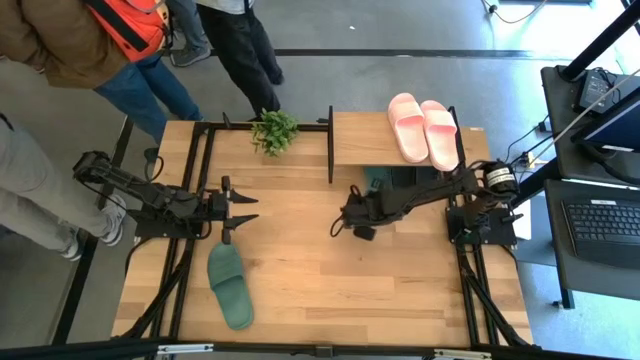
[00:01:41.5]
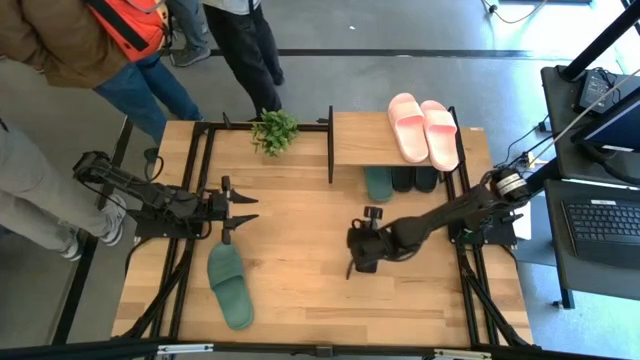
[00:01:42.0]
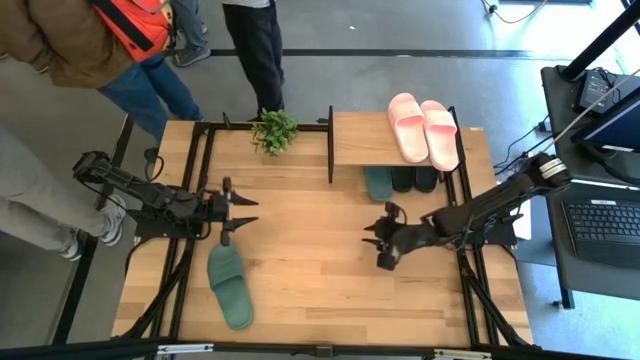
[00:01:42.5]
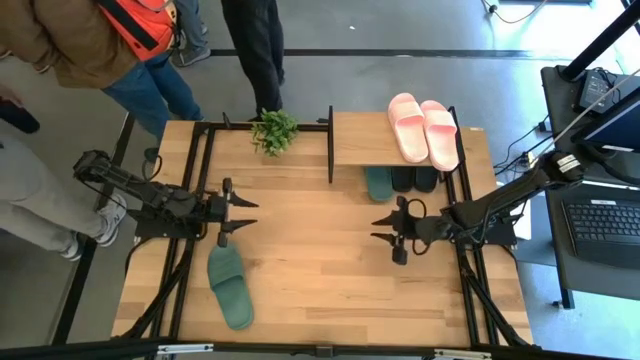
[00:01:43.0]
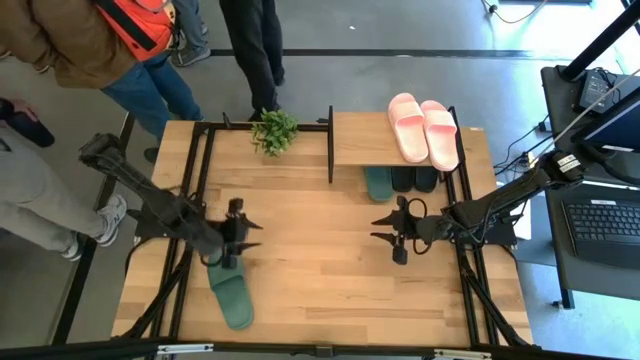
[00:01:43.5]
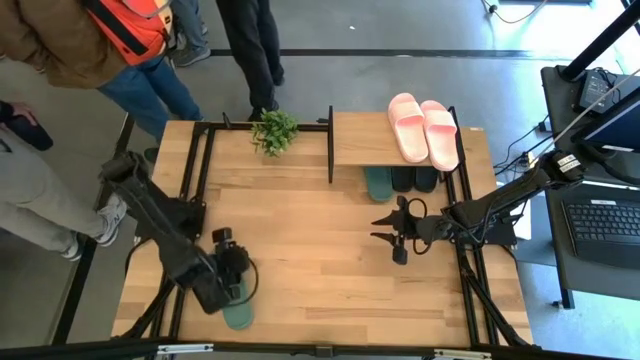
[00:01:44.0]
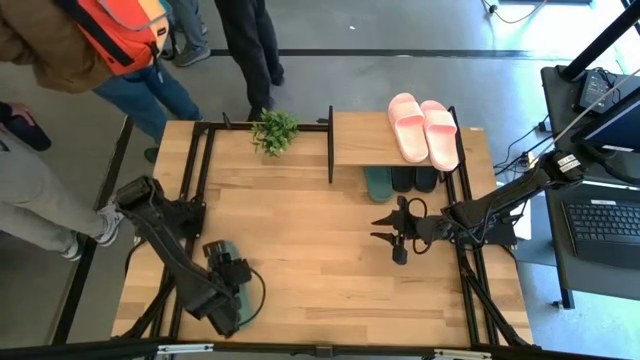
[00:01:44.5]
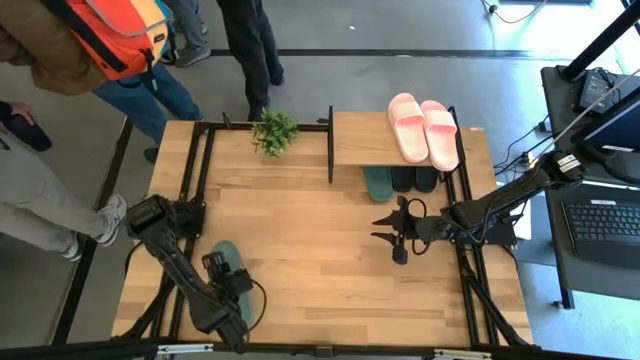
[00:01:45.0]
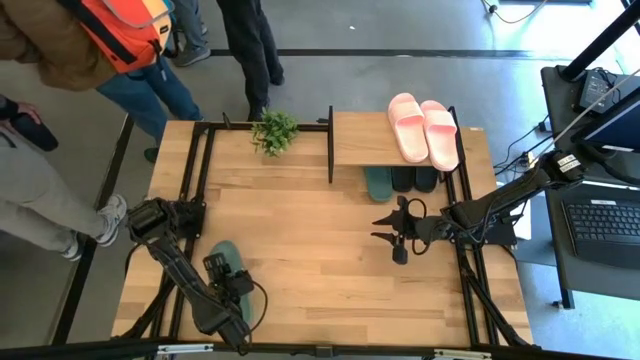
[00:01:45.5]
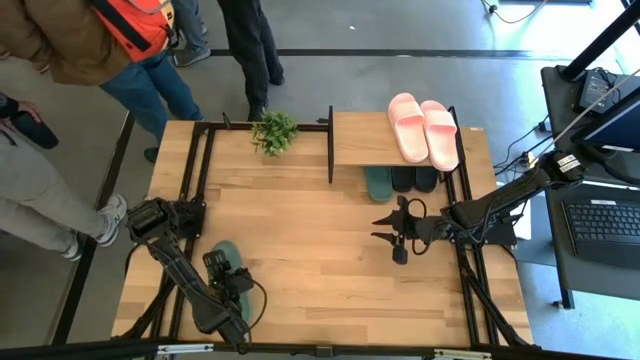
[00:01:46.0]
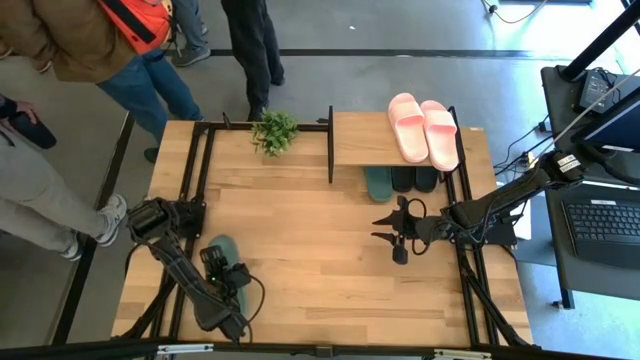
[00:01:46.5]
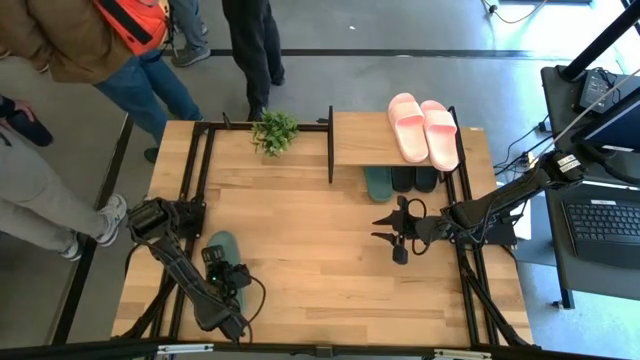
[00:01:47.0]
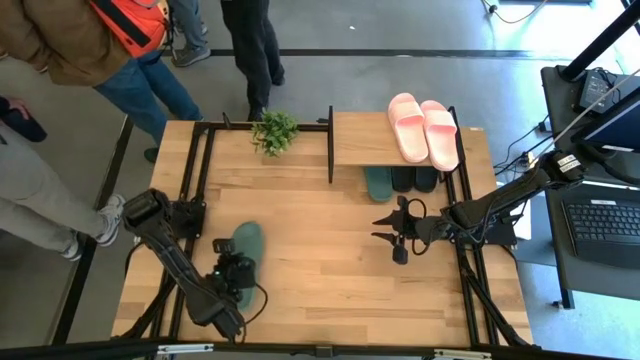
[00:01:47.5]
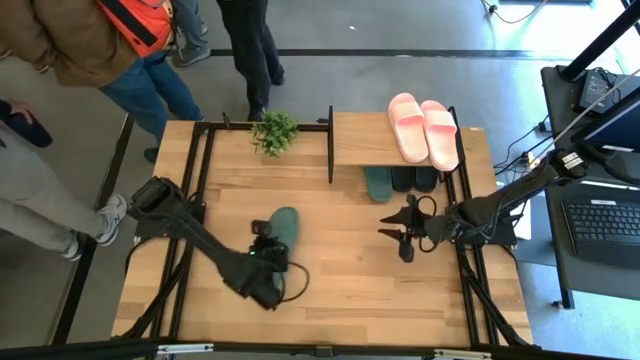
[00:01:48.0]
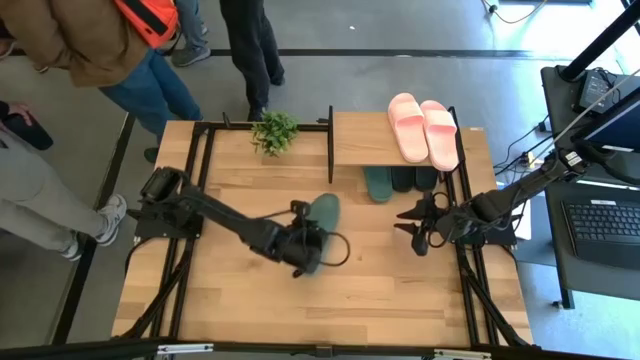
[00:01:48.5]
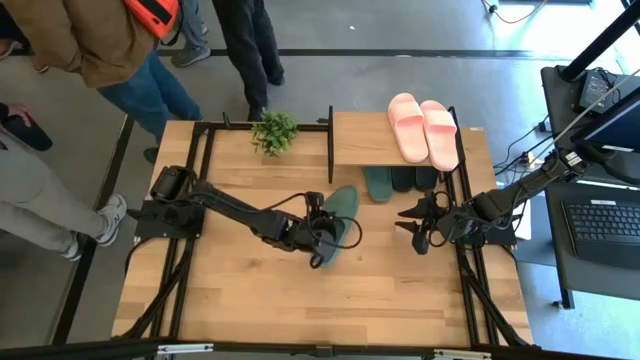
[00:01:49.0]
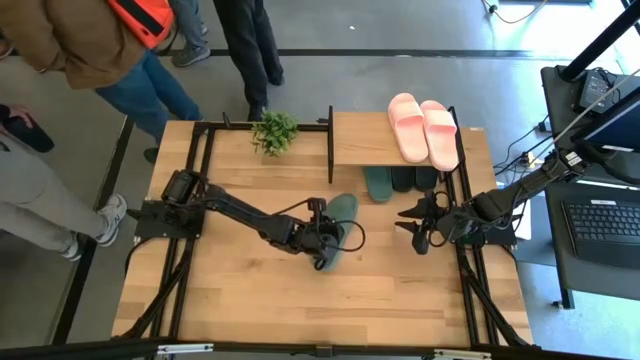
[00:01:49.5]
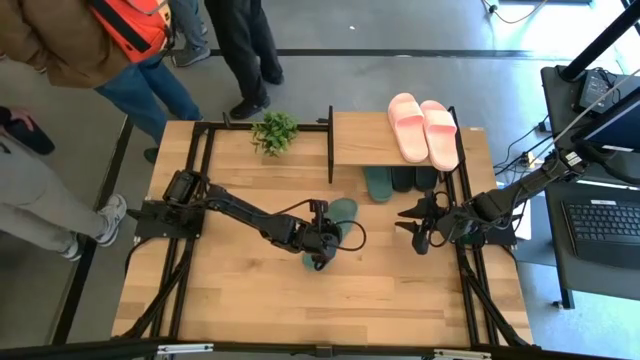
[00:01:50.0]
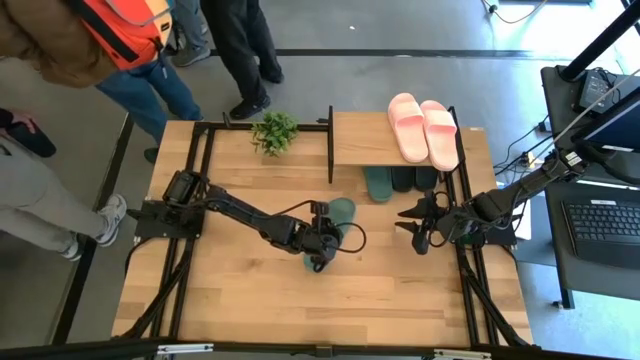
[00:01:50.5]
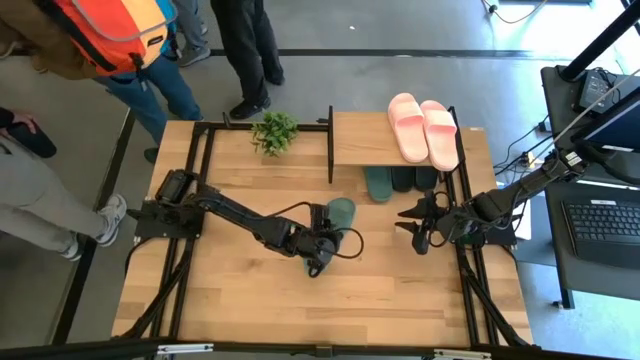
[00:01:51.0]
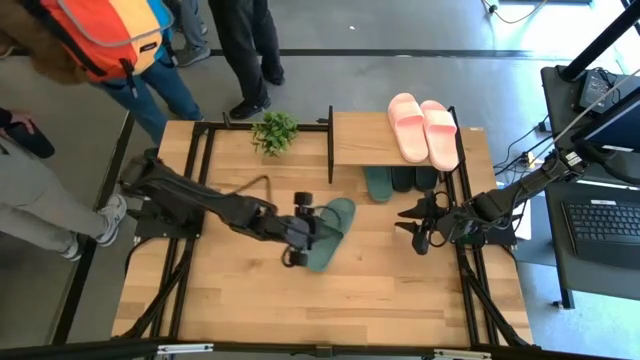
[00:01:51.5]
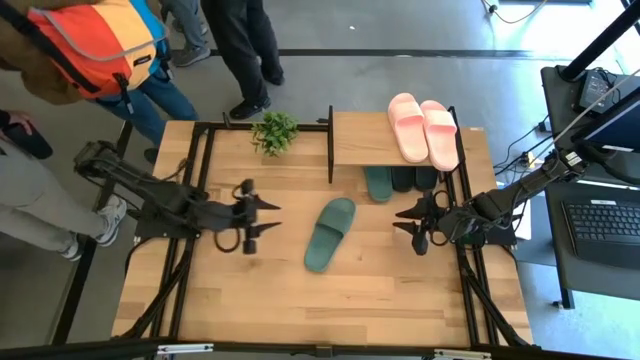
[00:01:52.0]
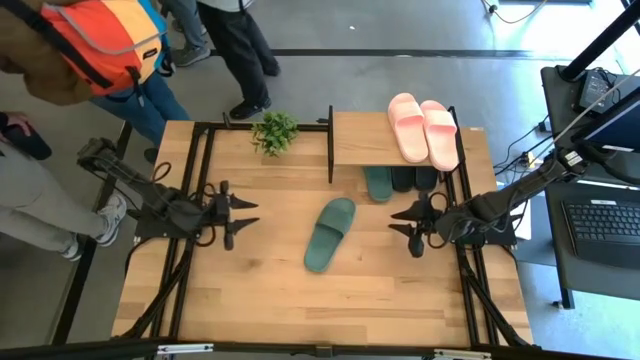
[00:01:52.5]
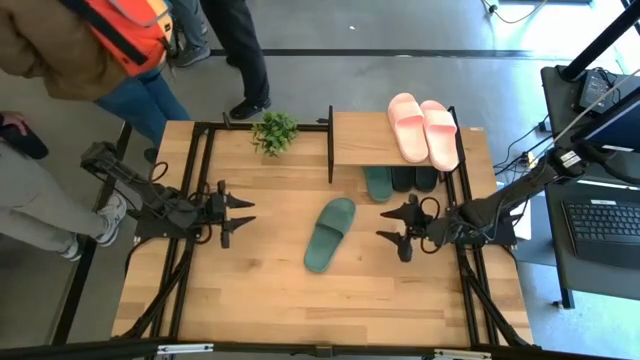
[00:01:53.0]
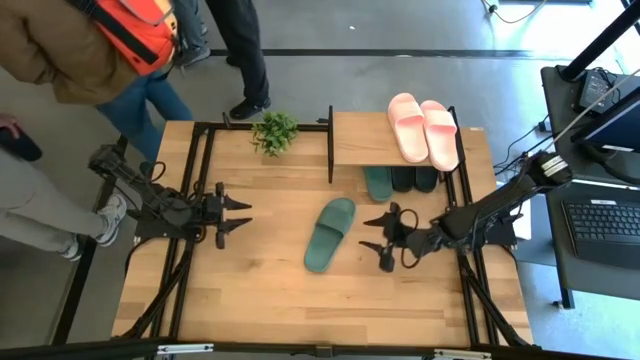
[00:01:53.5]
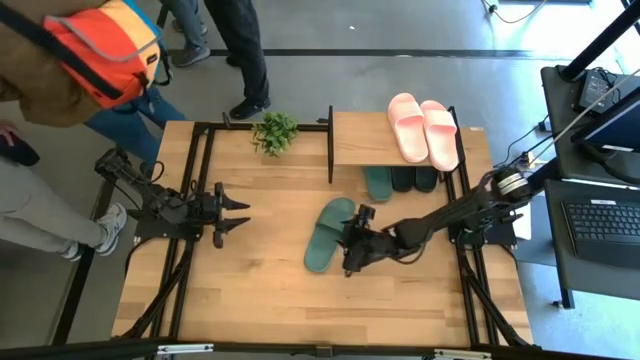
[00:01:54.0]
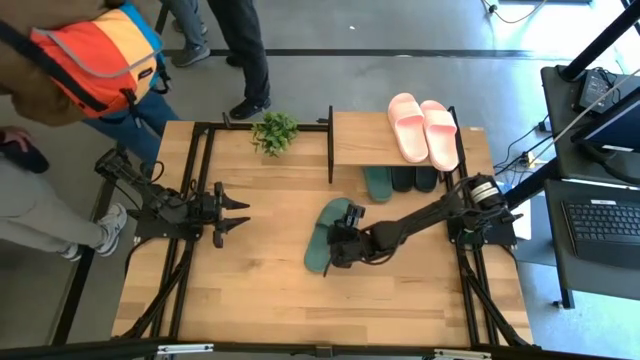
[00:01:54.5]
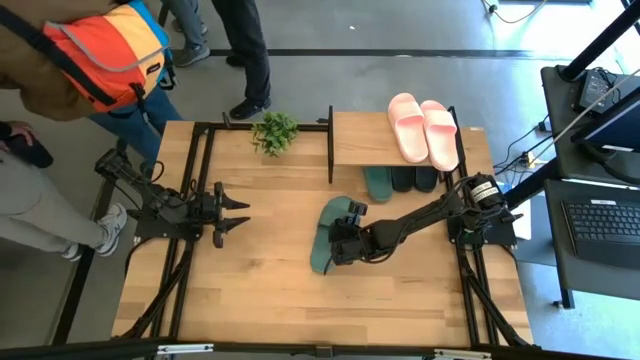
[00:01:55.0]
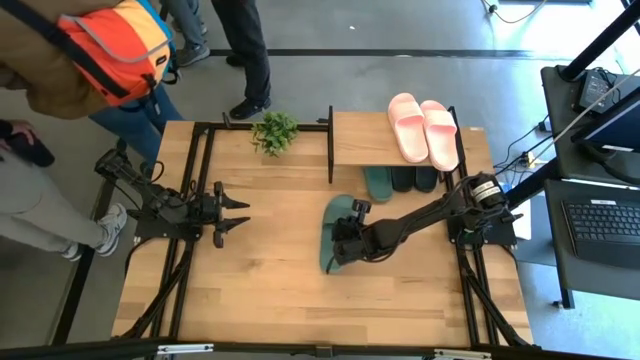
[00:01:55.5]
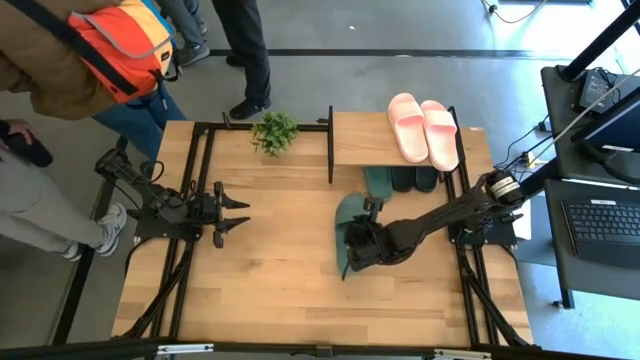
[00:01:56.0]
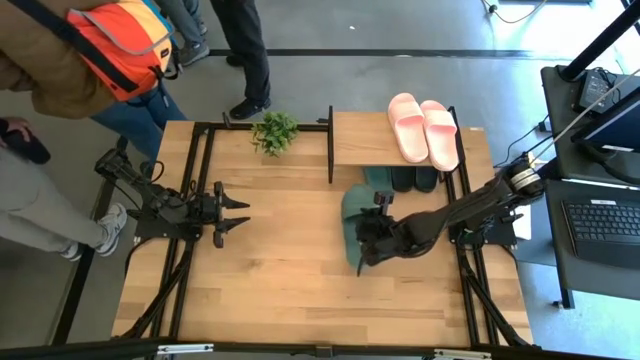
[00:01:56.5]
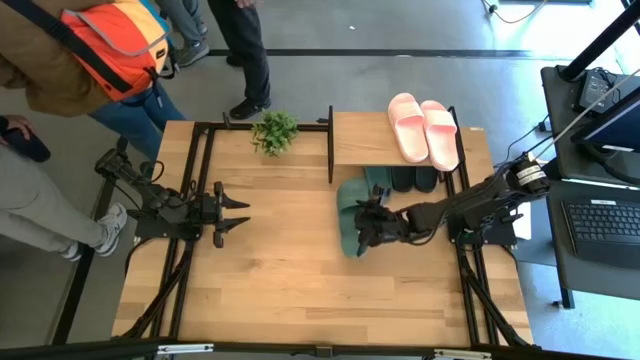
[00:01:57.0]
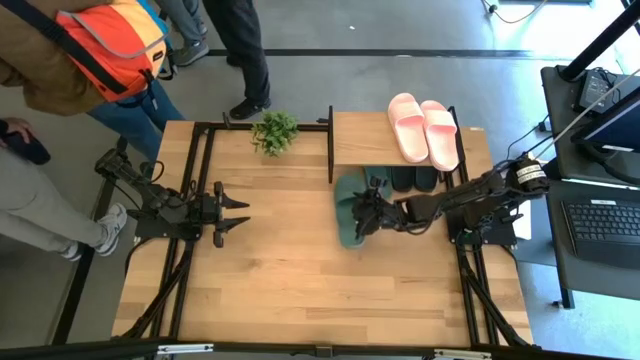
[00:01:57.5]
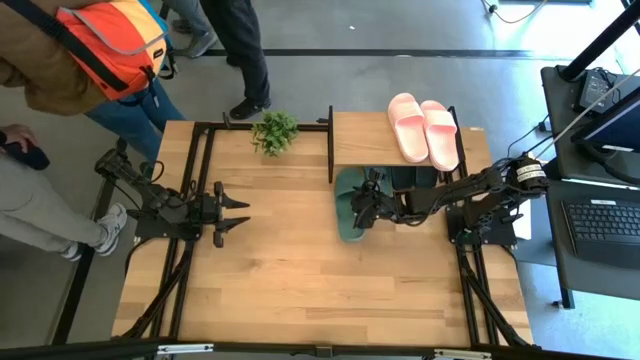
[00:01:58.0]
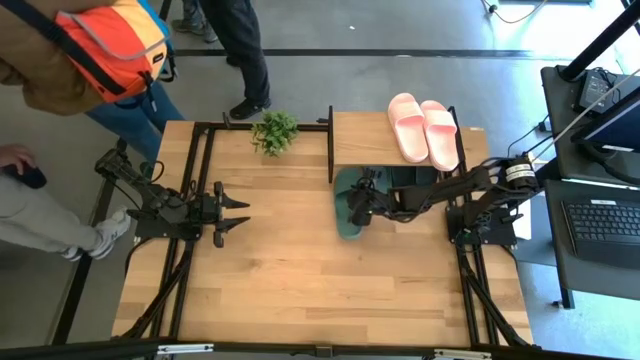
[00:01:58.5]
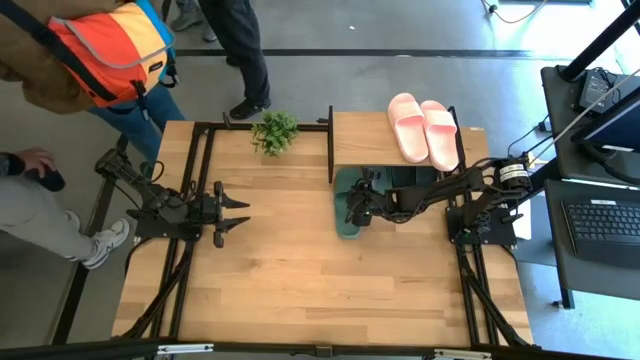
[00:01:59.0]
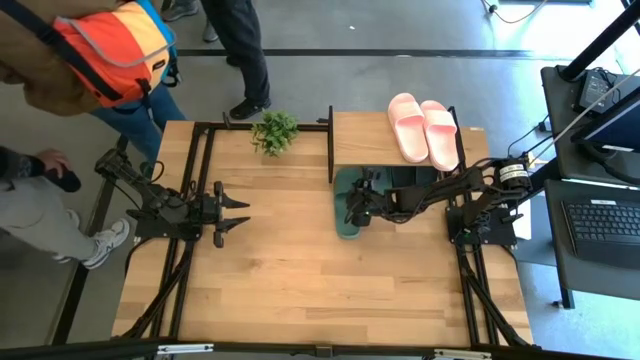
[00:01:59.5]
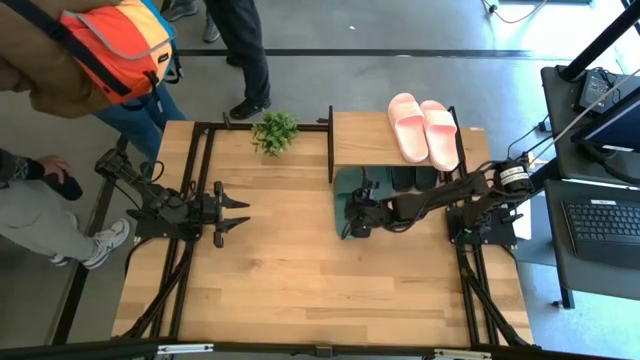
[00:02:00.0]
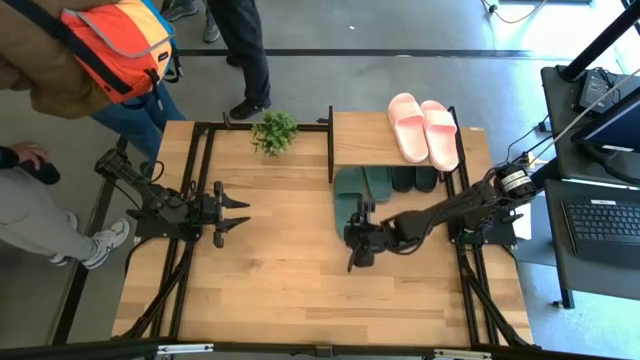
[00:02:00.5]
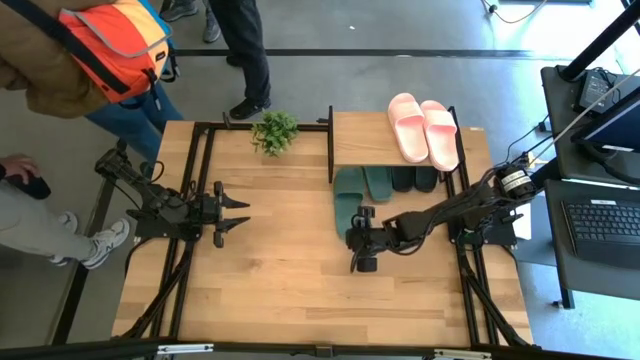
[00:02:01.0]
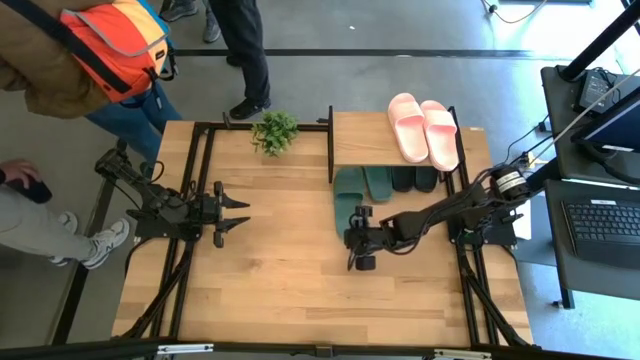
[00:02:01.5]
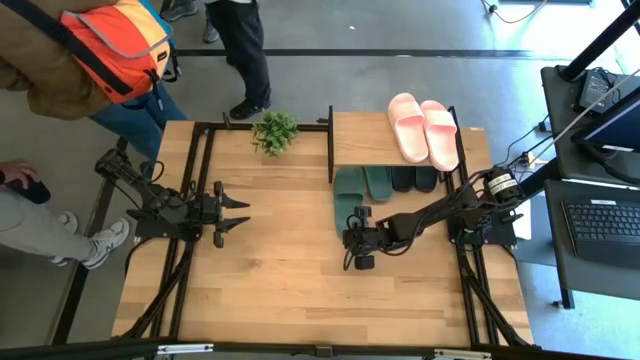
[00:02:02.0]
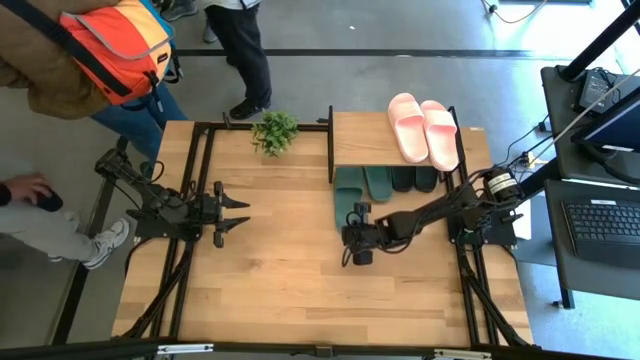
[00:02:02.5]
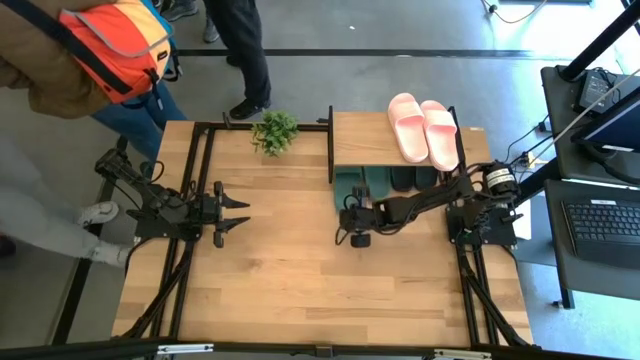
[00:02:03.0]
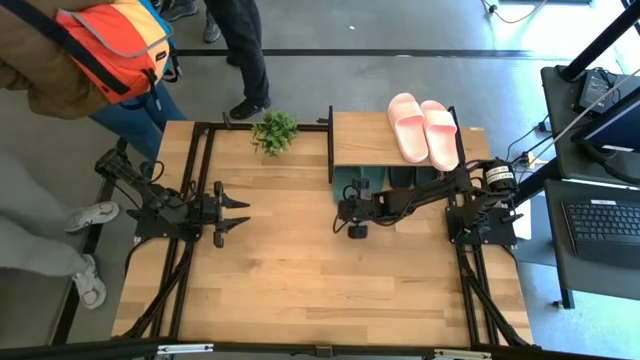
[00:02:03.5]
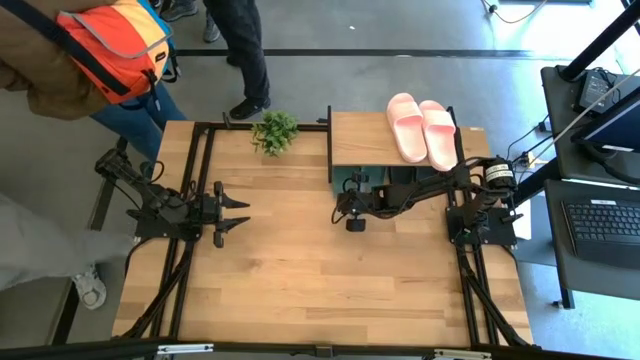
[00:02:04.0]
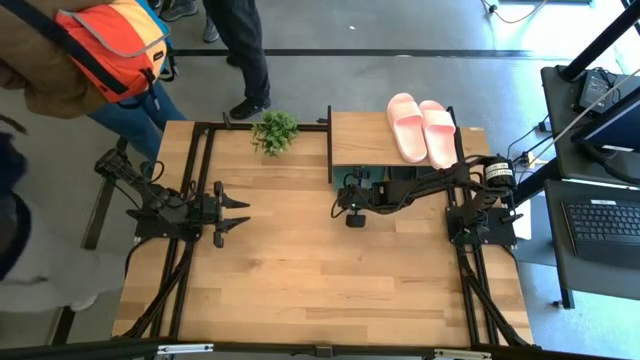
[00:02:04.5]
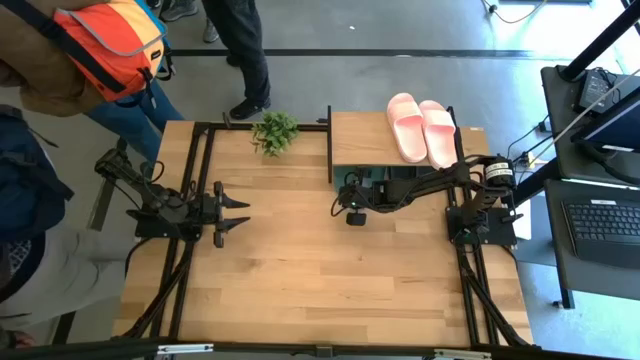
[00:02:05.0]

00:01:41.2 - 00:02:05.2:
Task: Pick and place slides into the shelf
Put the green slide under the shelf
